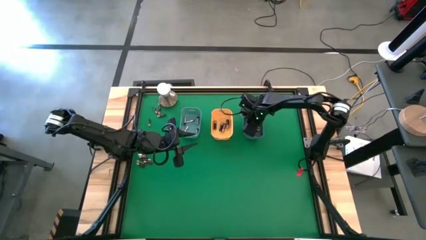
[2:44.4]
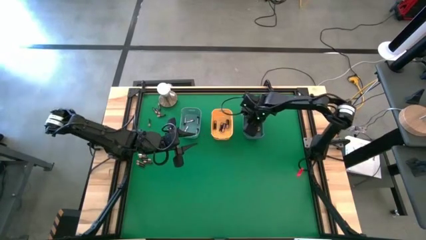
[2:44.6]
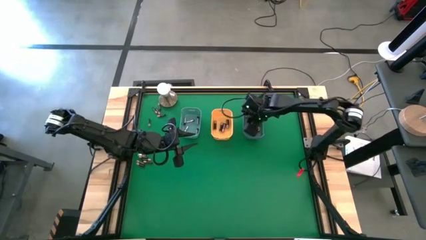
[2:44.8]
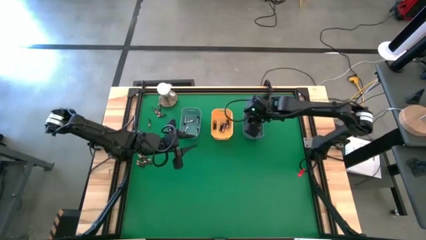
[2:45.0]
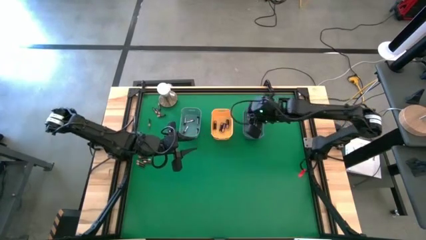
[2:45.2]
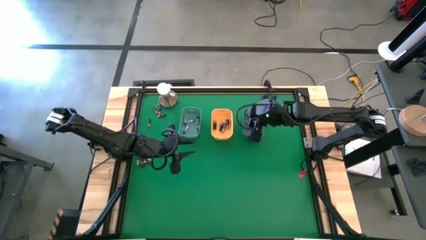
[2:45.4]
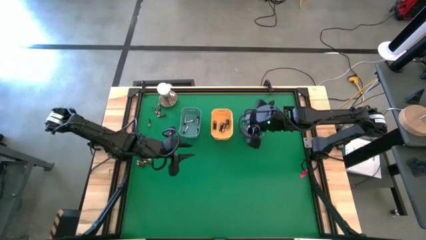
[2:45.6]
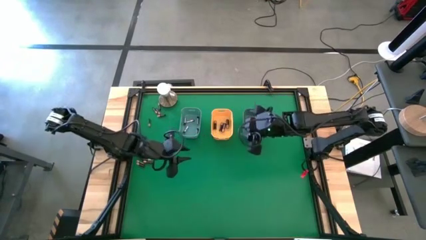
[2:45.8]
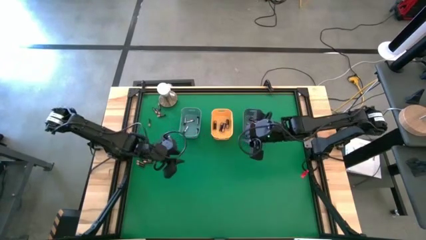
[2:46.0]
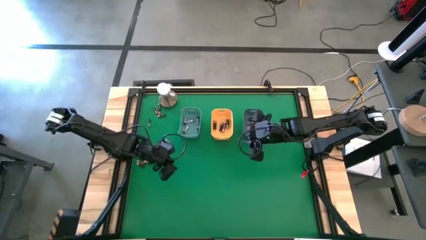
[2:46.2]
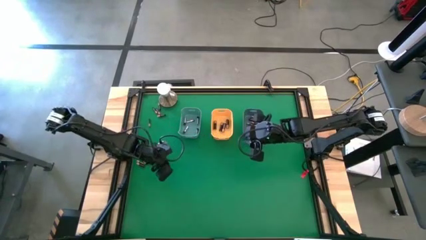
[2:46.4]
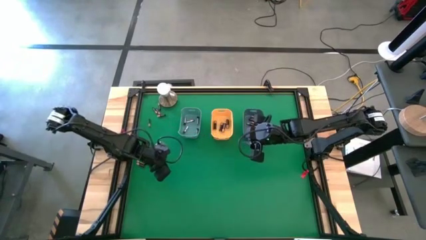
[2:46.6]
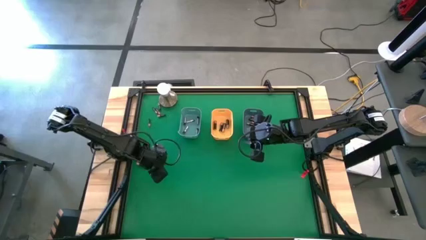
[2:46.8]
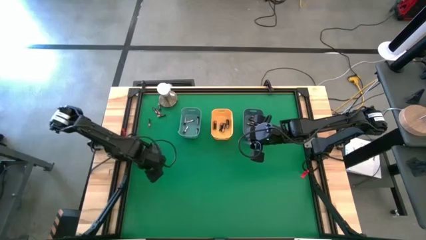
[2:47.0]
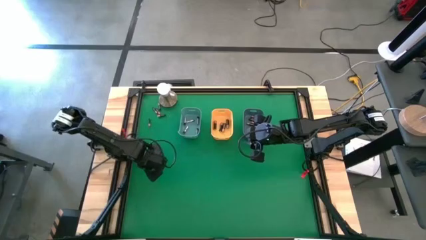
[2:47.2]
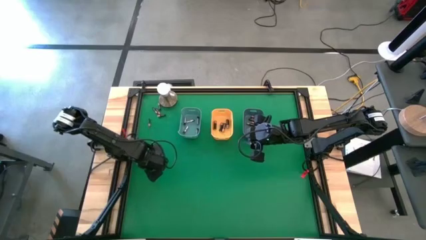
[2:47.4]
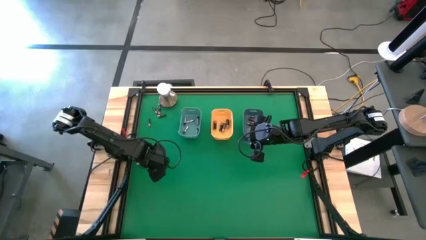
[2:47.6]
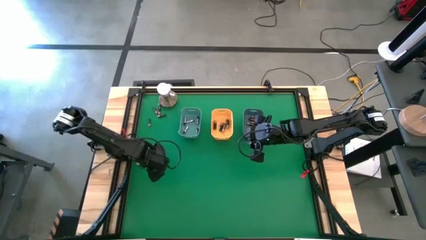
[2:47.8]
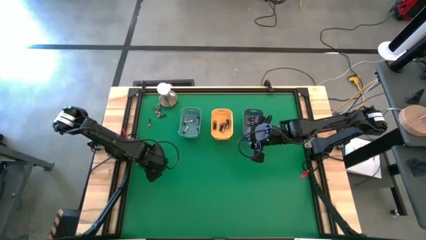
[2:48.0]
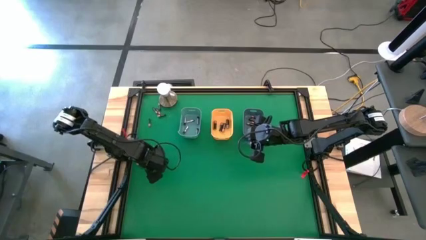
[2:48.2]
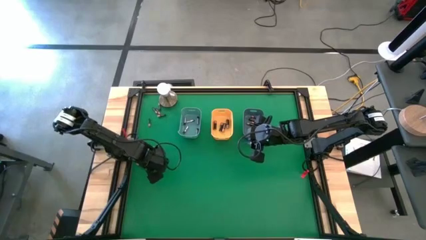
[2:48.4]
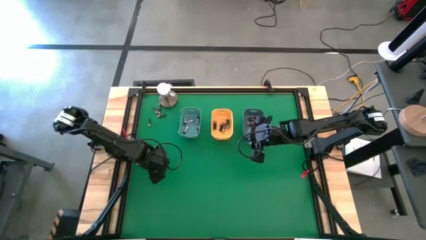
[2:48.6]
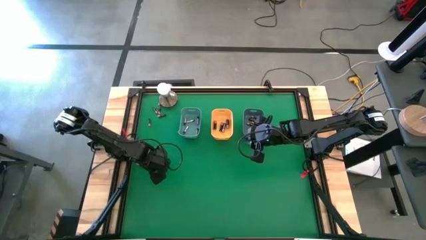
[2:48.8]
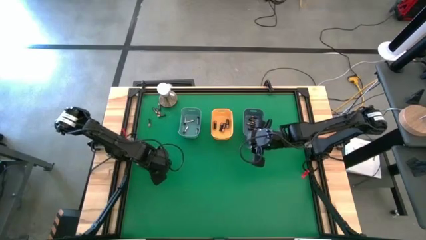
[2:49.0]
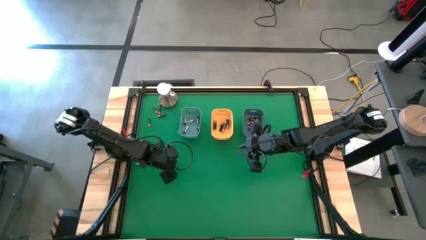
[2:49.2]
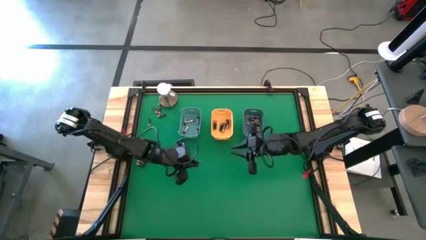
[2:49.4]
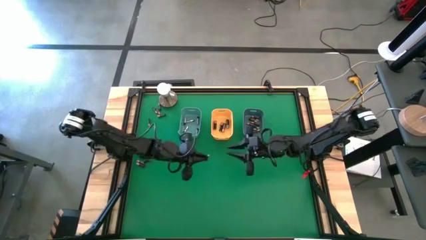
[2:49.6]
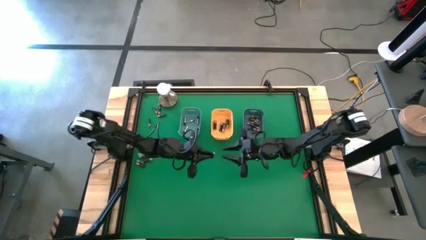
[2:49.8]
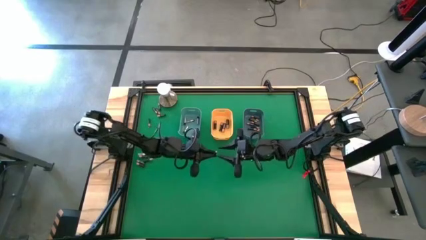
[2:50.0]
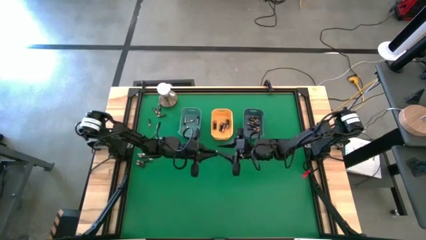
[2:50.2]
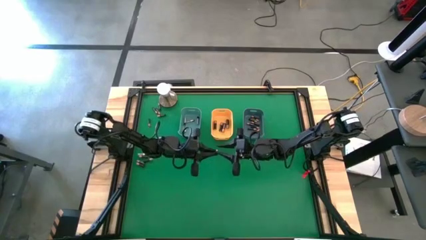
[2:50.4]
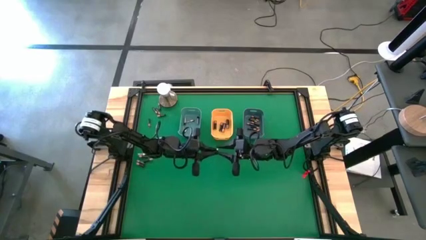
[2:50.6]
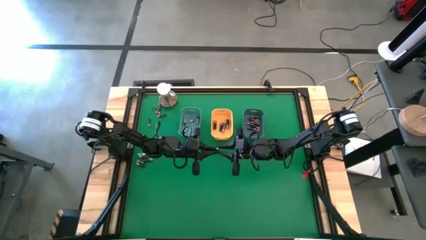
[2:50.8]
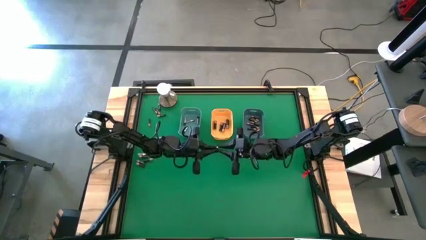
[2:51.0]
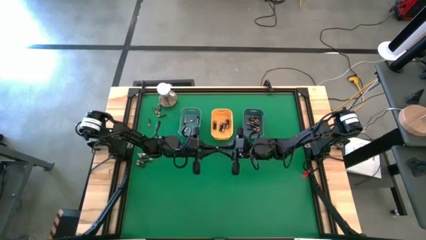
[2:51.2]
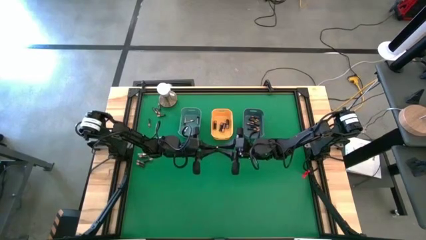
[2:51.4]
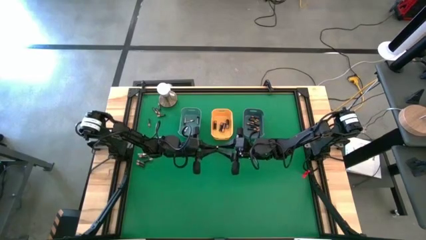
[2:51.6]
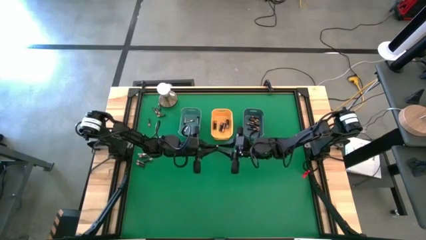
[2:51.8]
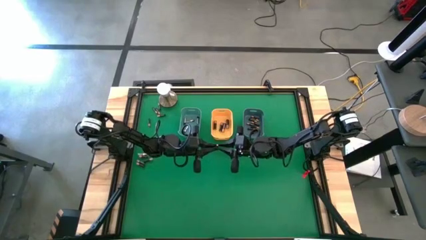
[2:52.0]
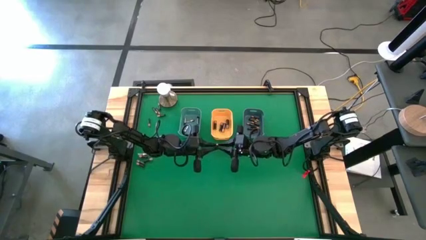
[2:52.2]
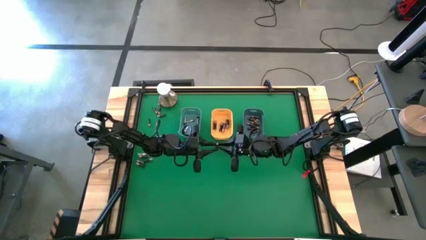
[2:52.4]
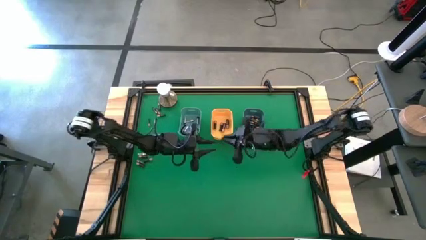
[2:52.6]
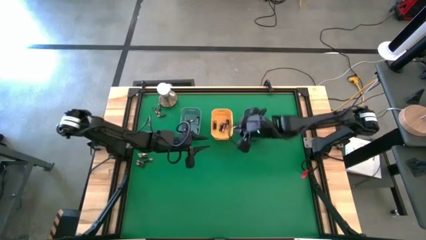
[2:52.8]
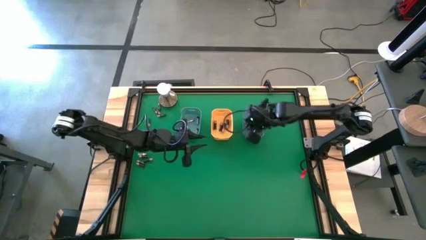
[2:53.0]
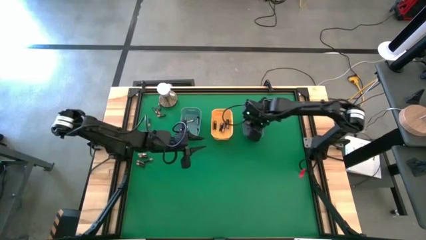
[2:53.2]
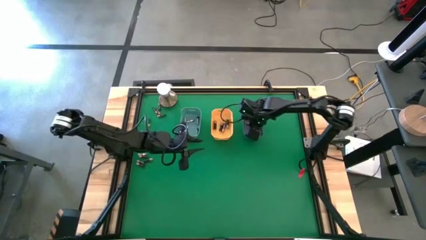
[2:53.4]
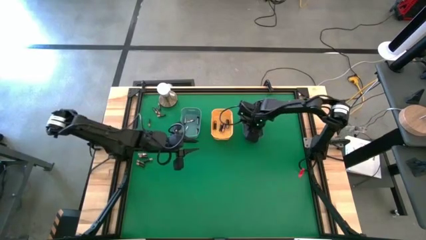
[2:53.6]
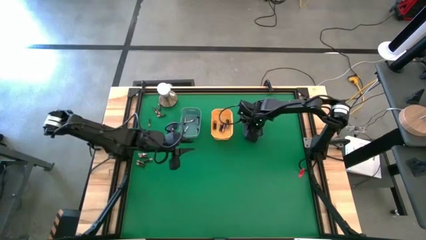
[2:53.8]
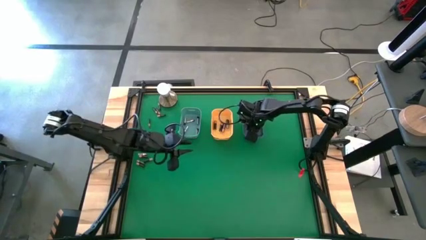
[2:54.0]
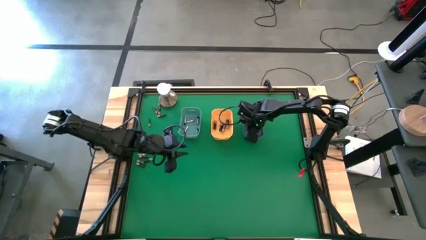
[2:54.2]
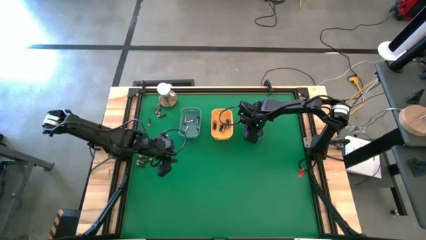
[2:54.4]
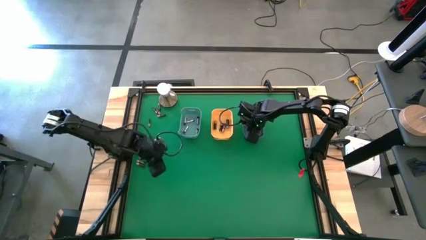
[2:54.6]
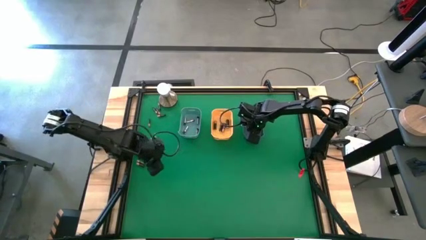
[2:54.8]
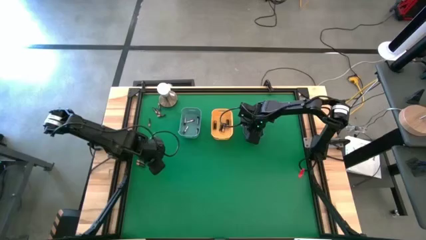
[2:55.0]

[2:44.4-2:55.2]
Task: Sort batteries
Put the small black battery into the blue bin

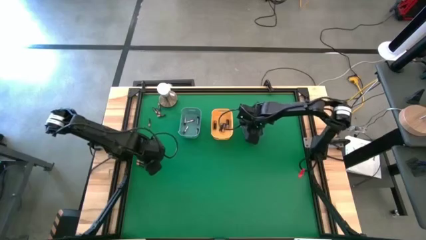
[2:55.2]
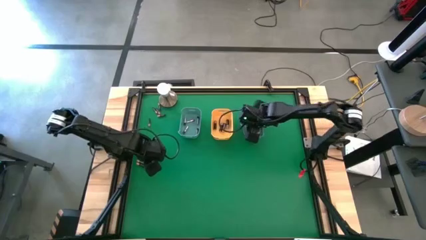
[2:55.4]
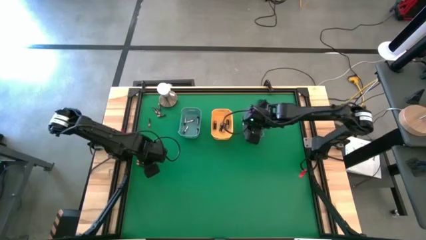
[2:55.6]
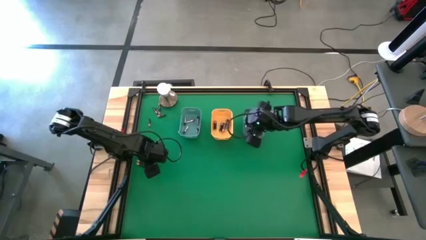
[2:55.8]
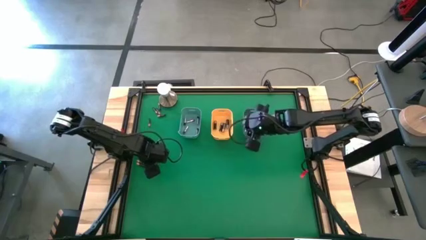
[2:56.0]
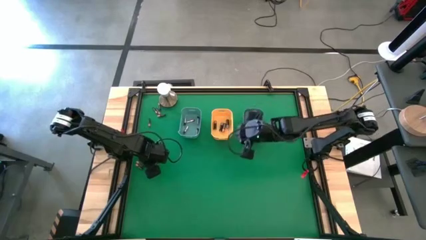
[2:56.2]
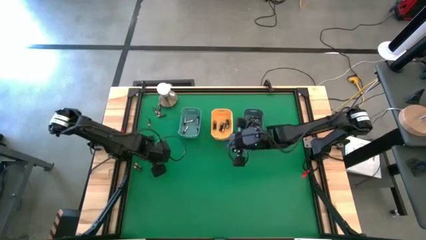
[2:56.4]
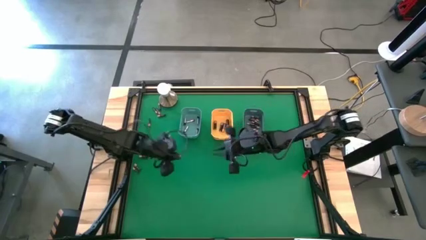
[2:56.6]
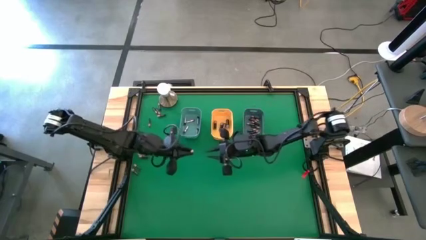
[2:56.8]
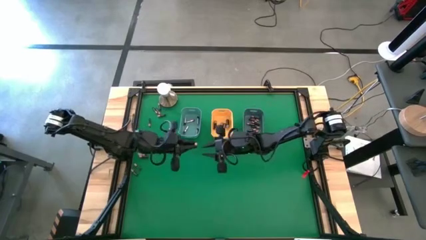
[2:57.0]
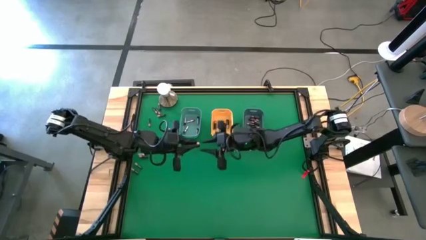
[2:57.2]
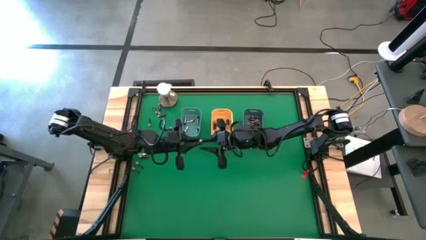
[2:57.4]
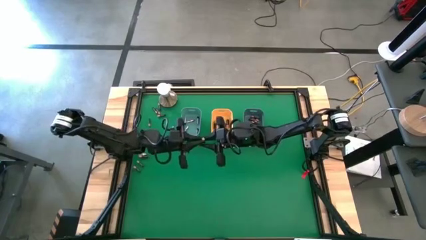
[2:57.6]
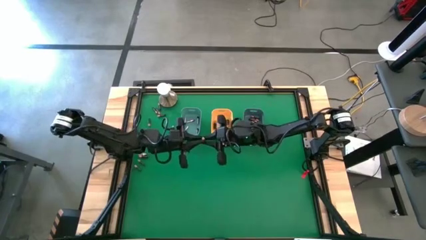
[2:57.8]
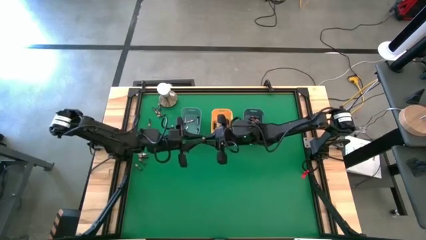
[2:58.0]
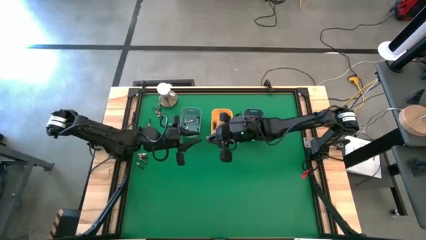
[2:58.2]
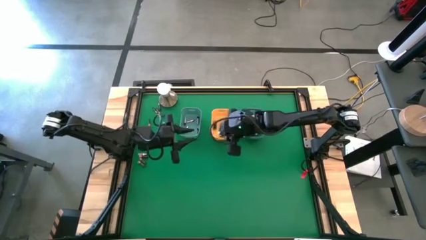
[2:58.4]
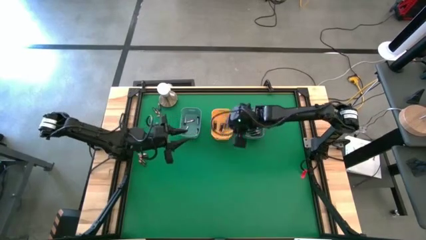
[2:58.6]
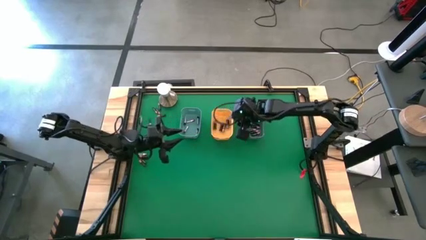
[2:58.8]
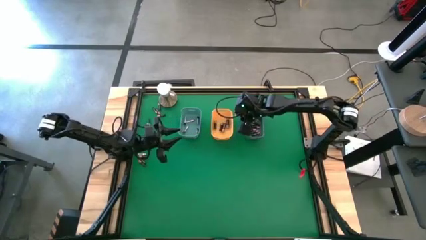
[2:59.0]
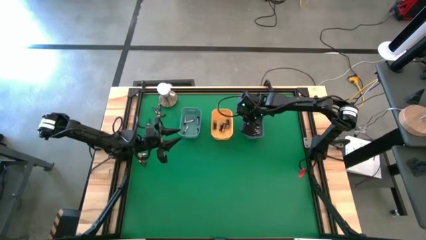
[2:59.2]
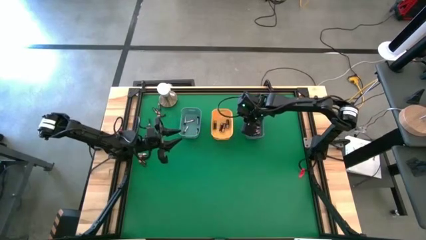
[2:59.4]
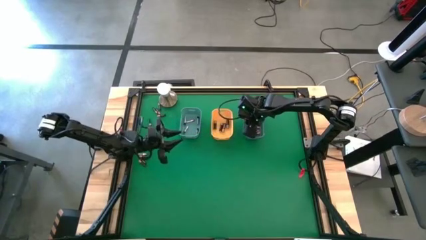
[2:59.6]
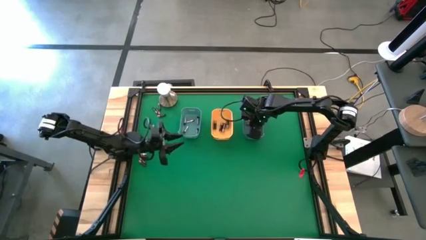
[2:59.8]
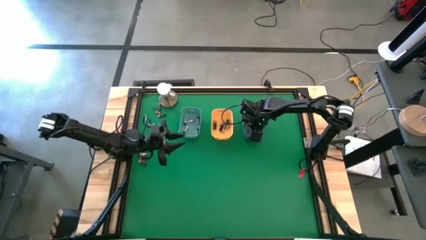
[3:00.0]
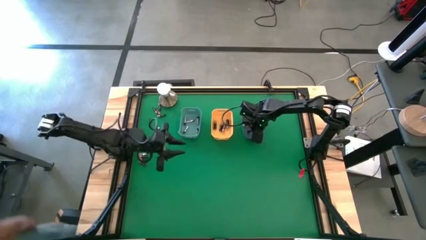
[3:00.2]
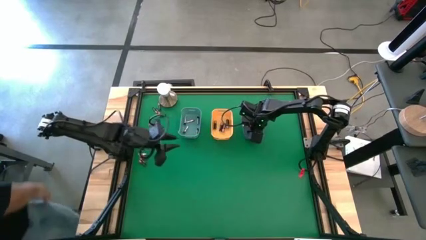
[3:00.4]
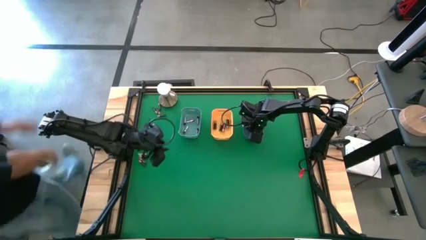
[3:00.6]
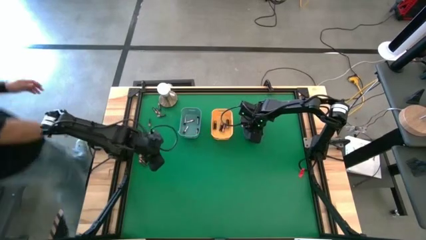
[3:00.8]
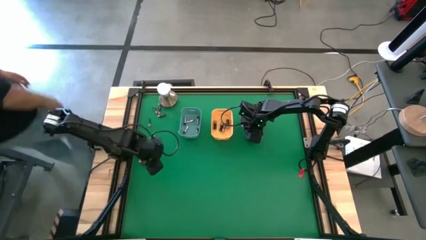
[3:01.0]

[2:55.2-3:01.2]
Put the small black battery into the blue bin
